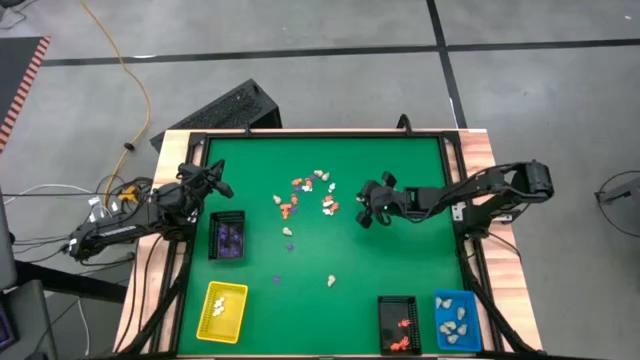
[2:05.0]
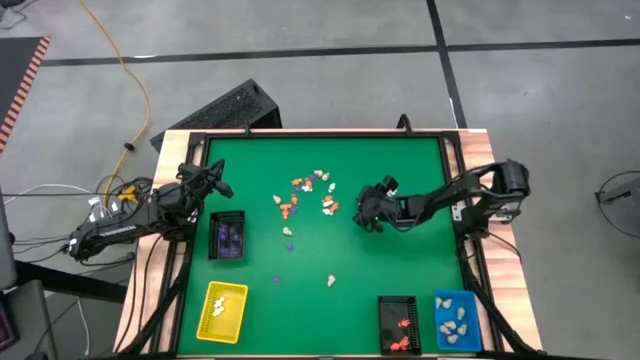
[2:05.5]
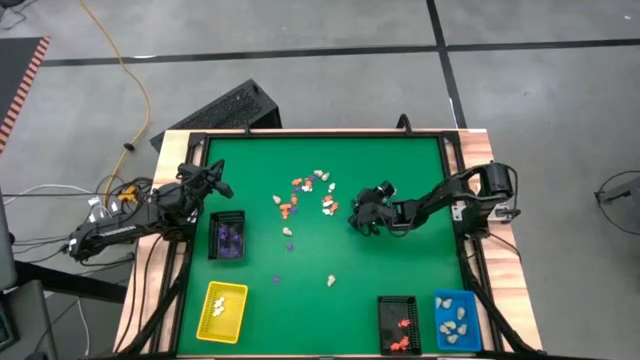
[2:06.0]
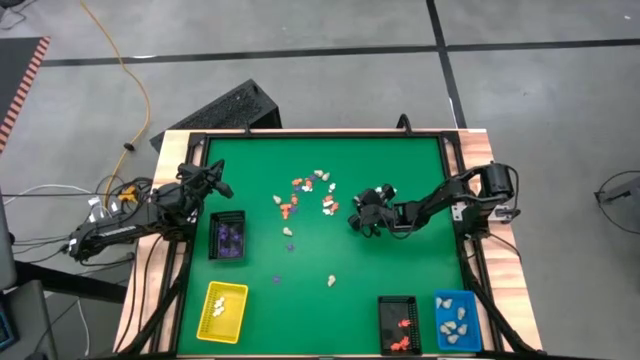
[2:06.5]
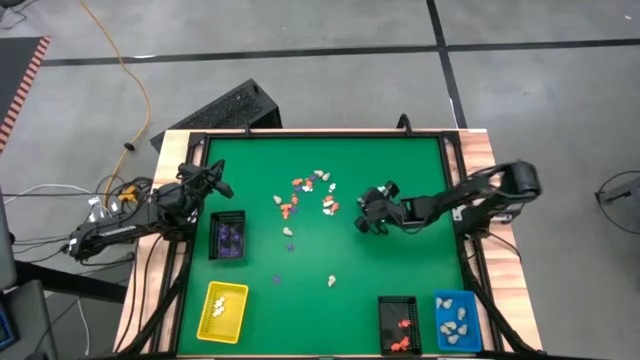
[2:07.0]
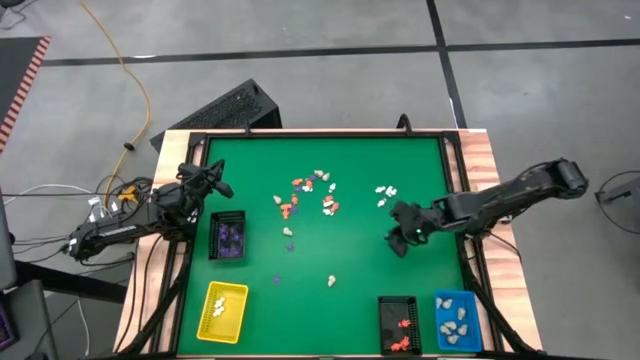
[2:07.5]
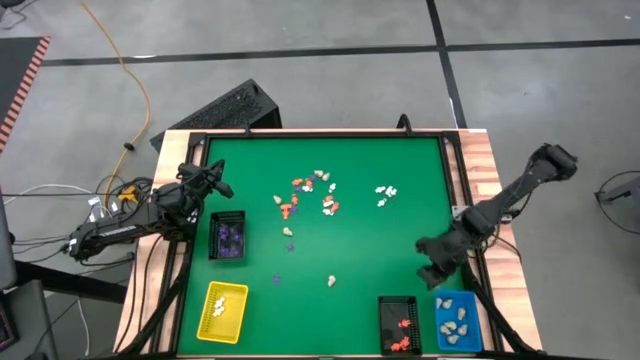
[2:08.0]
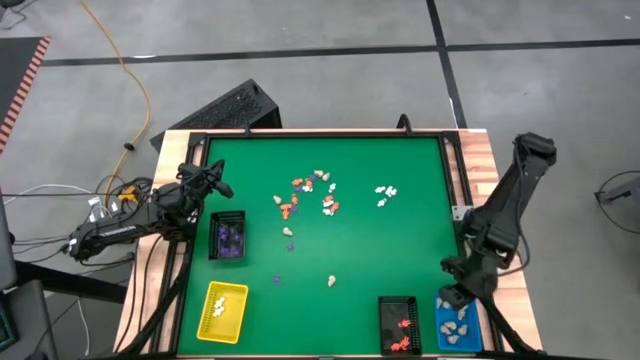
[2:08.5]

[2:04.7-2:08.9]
Task: Sort Halloween decoration
Put the white skull toy into the blue basket

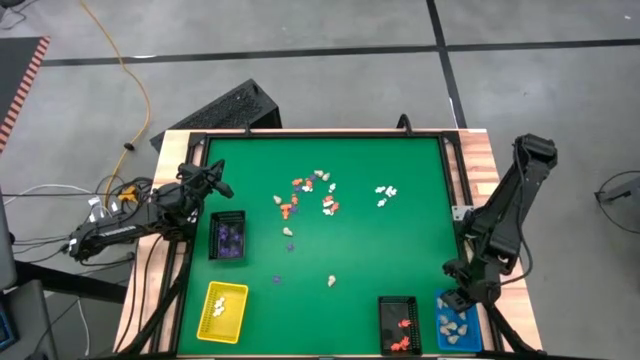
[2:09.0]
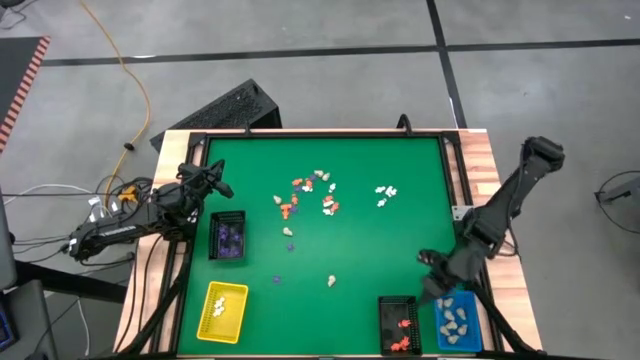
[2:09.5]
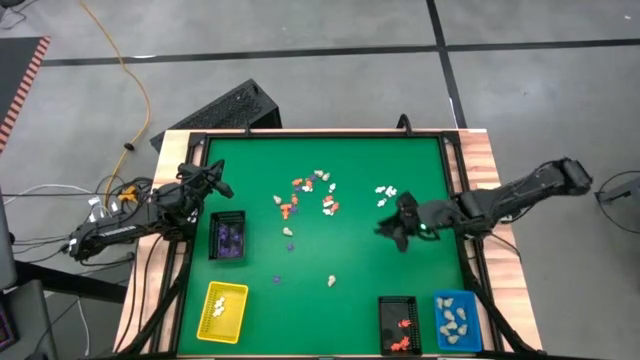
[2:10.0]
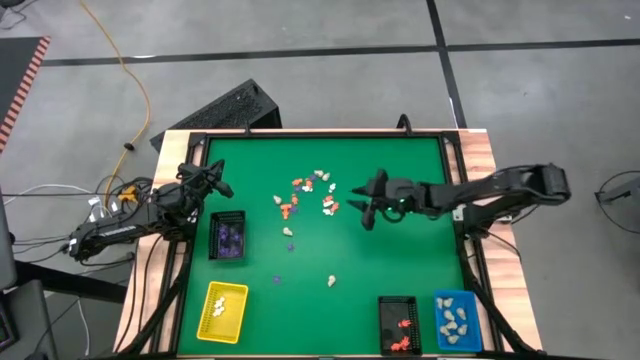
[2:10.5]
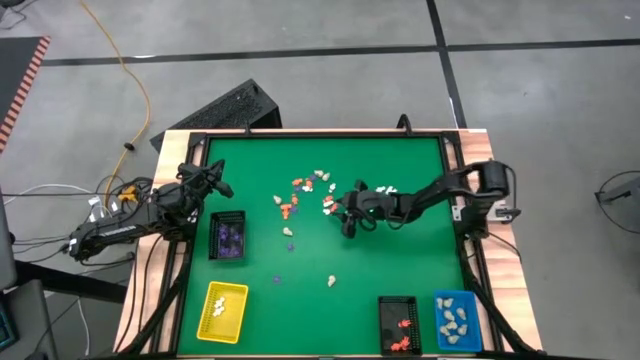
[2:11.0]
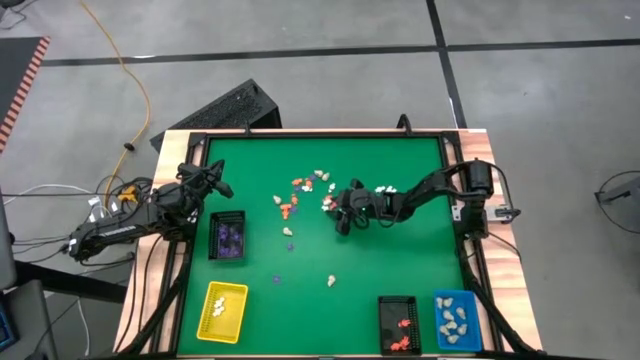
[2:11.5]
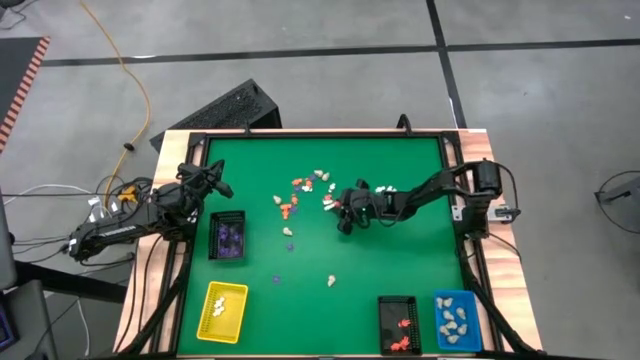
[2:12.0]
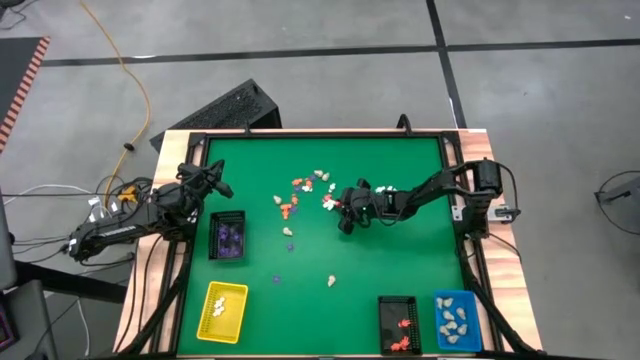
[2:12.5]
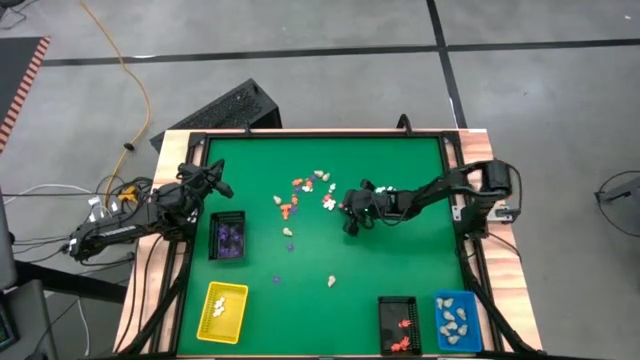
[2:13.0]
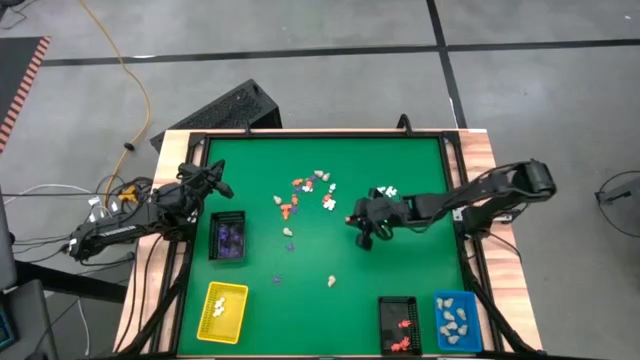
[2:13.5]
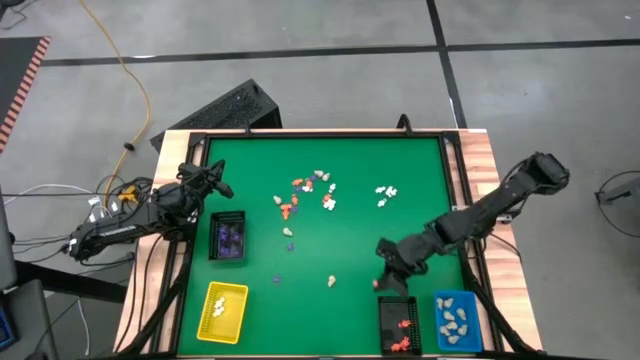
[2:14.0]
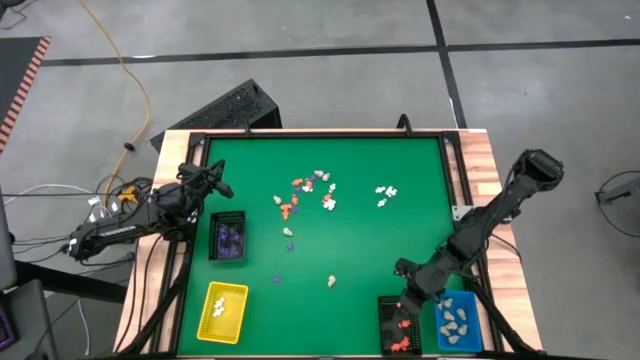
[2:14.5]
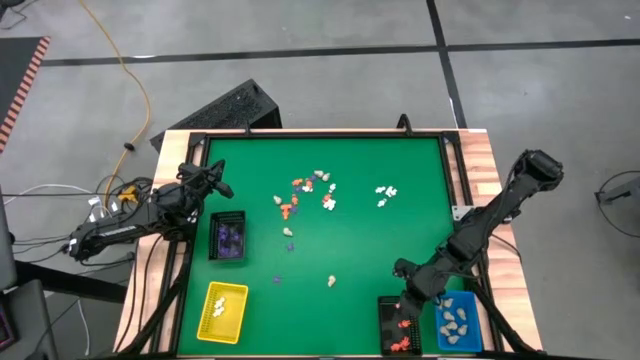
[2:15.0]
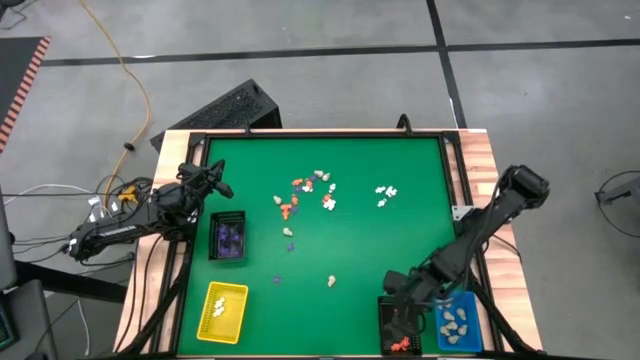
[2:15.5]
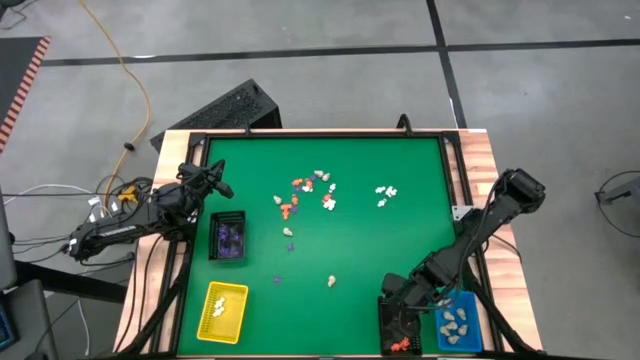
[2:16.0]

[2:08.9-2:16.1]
Put the orange skeleton toy into the bottom black basket

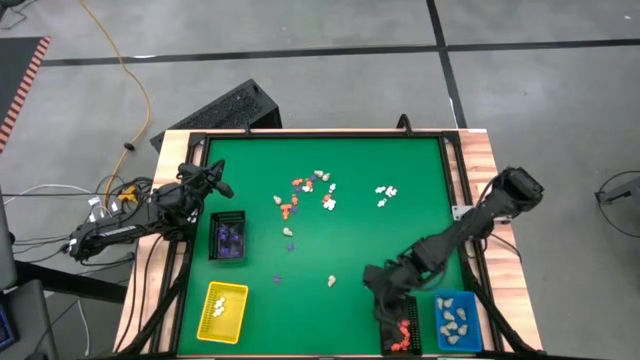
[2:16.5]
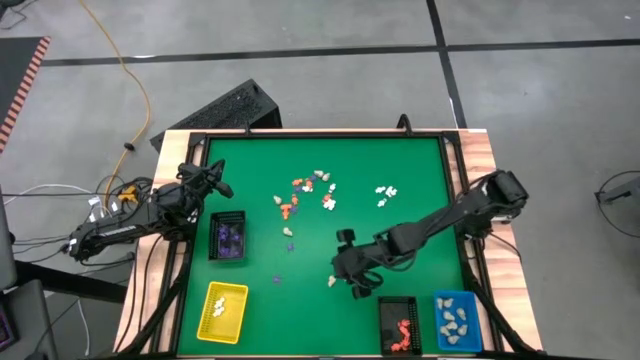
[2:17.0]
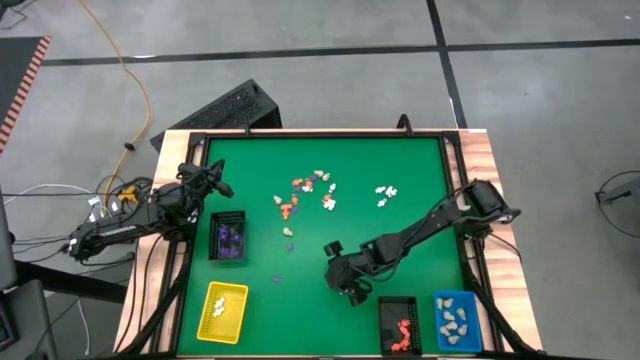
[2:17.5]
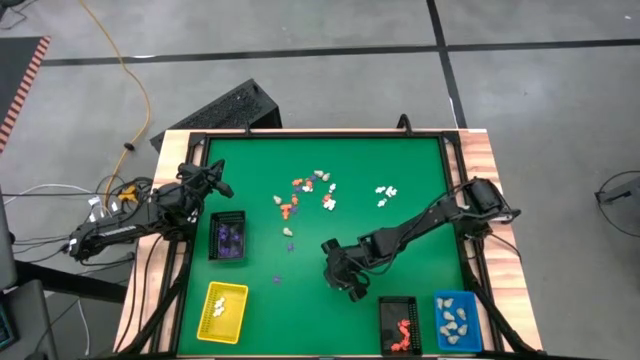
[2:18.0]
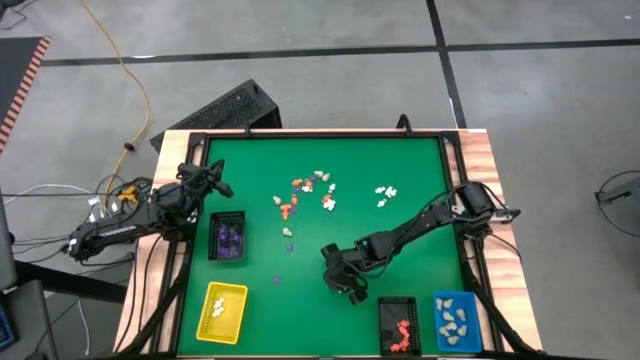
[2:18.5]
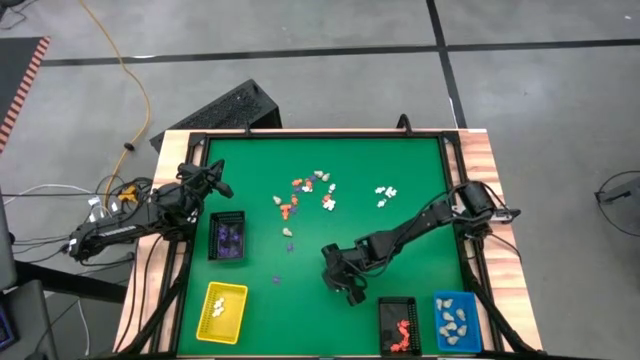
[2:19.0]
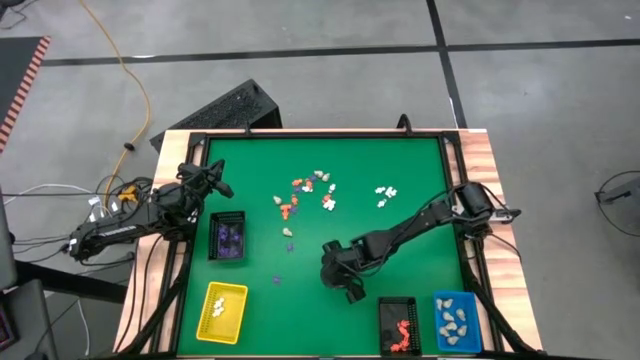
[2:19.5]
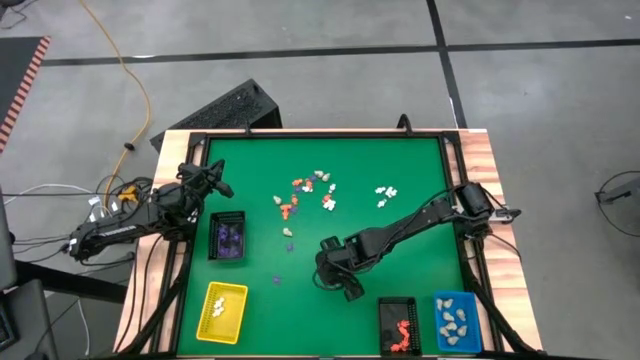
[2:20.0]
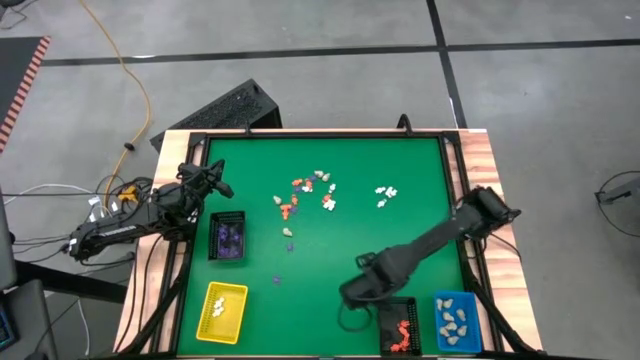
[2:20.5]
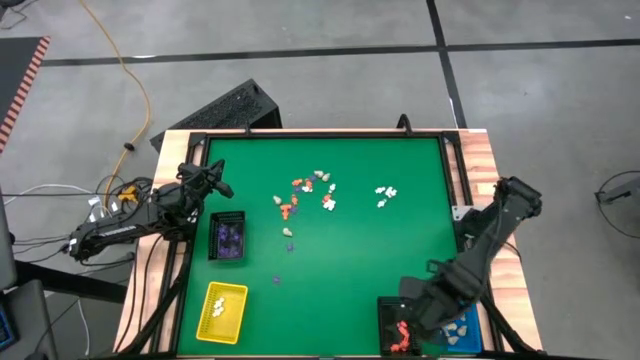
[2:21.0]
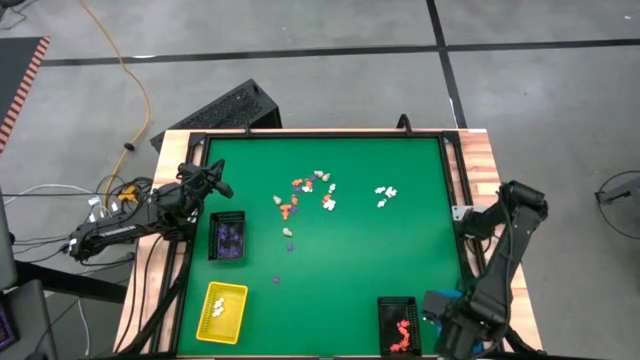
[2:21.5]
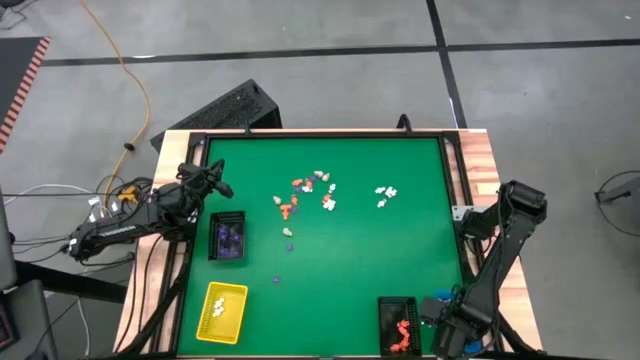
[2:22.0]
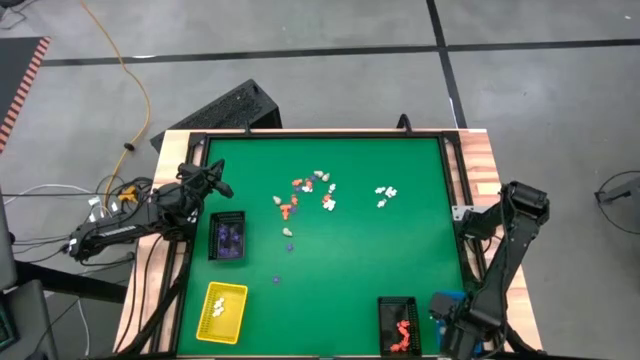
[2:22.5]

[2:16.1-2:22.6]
Put the white skull toy into the blue basket

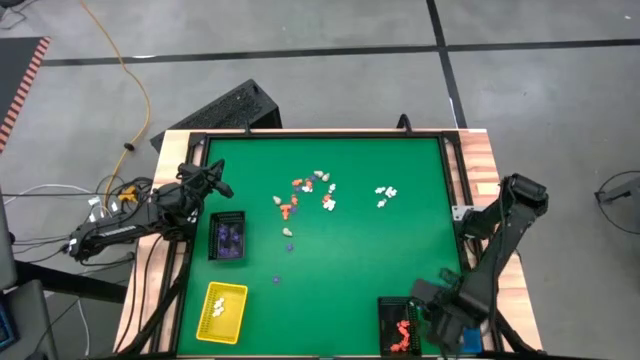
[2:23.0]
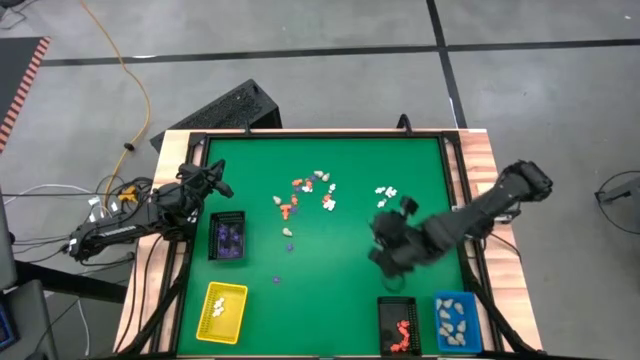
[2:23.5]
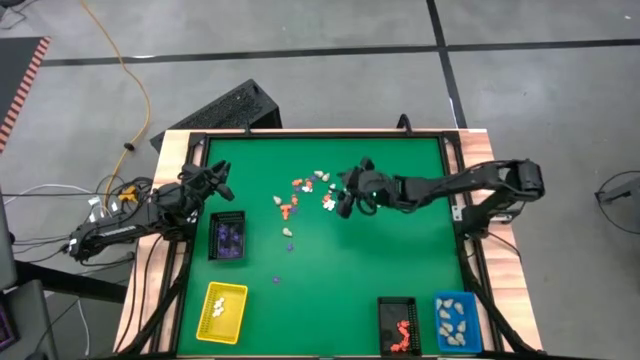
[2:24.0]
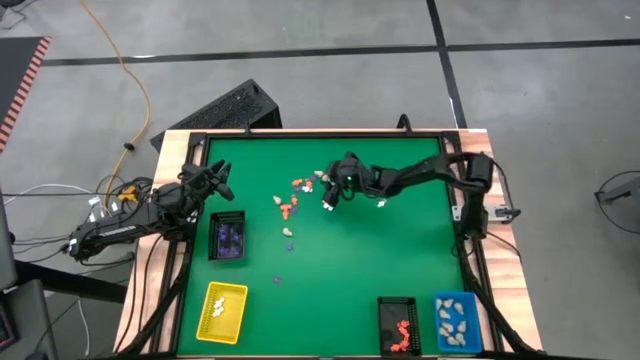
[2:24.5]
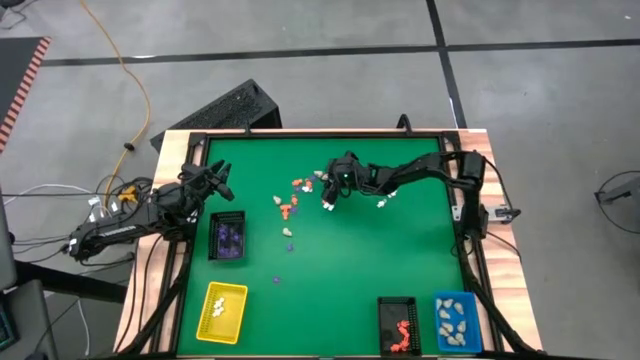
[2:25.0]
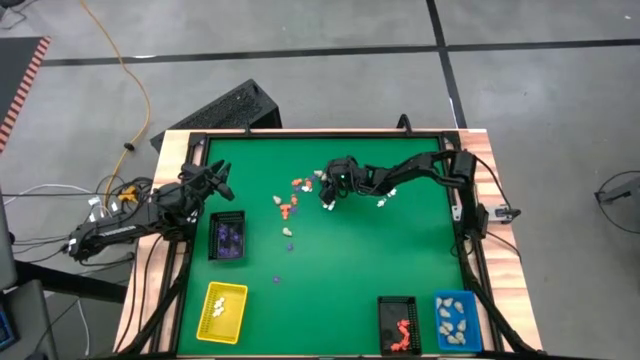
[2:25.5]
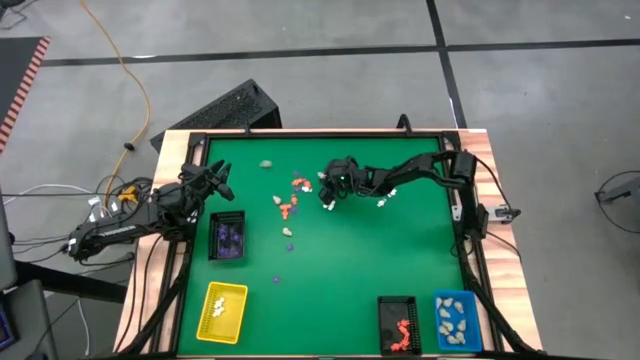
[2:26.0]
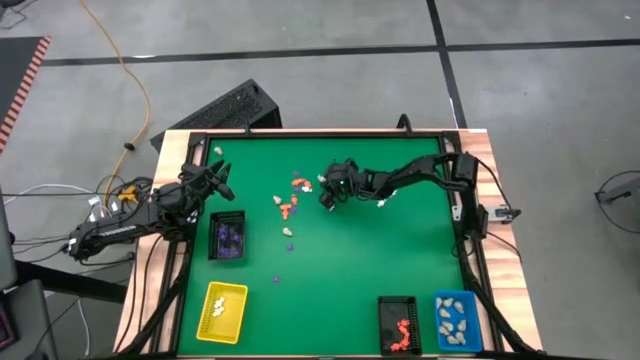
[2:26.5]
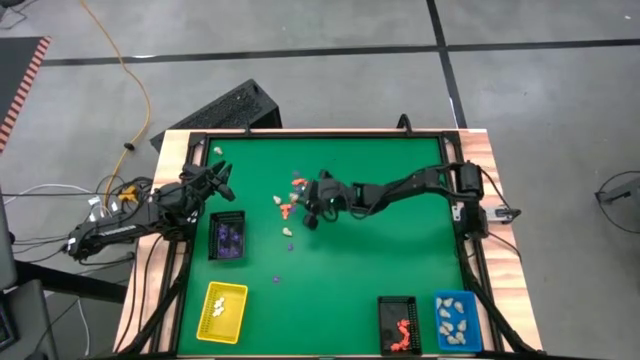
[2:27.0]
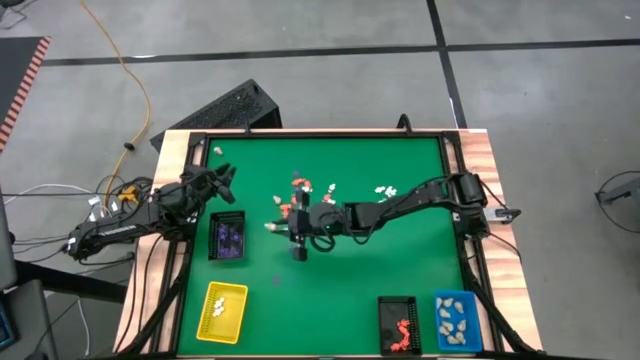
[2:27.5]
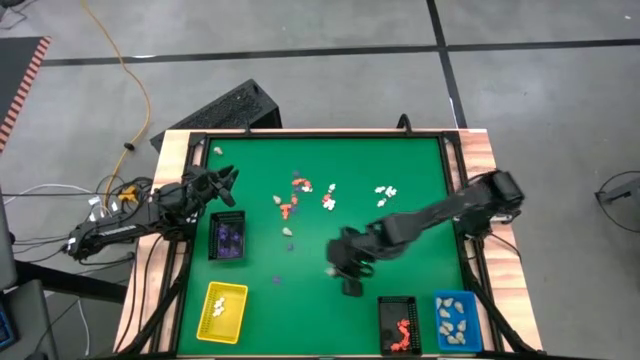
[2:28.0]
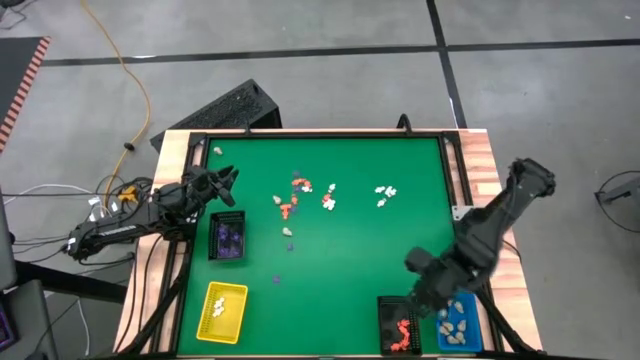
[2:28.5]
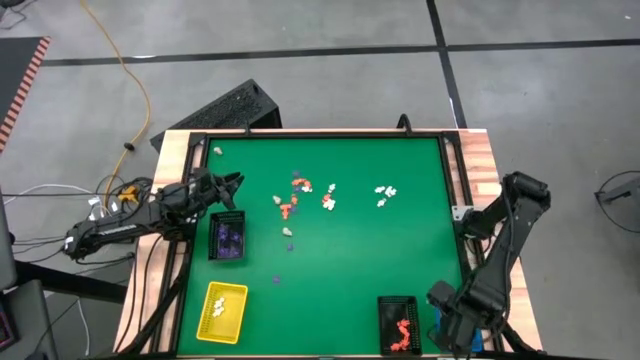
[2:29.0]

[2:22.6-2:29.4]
Put the white skull toy into the blue basket
